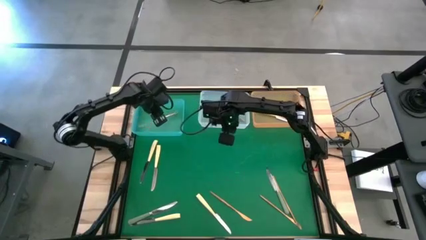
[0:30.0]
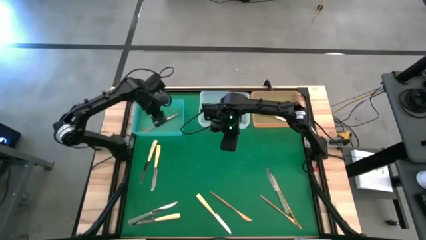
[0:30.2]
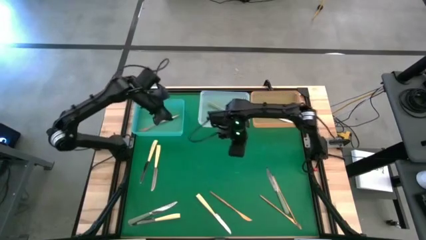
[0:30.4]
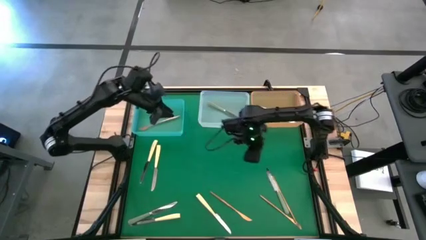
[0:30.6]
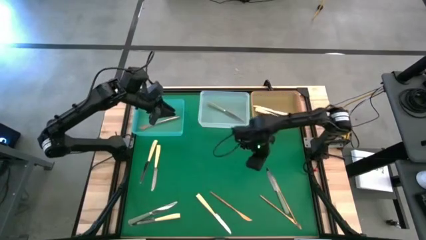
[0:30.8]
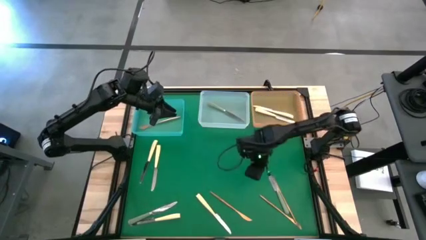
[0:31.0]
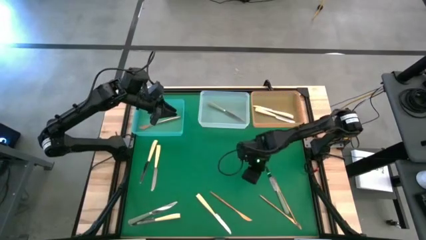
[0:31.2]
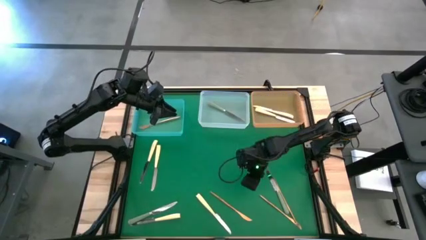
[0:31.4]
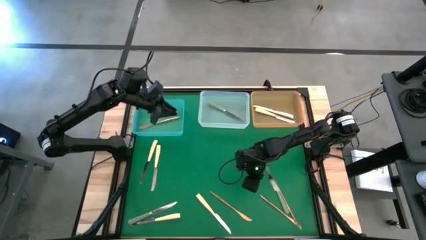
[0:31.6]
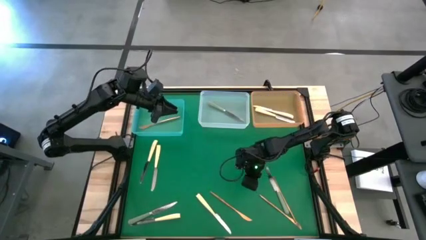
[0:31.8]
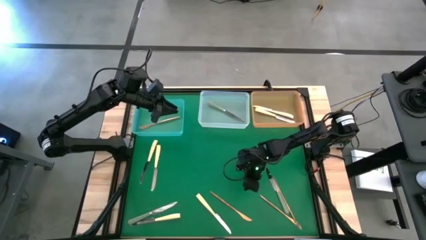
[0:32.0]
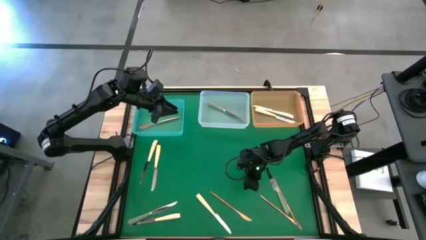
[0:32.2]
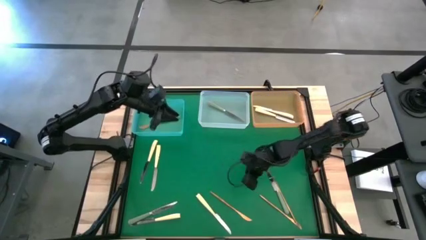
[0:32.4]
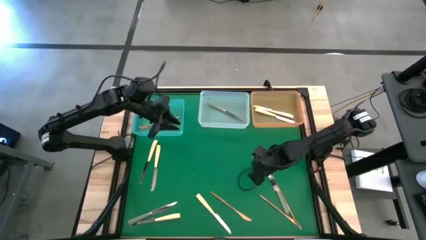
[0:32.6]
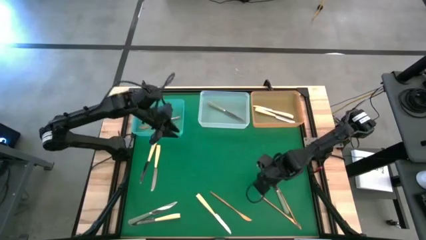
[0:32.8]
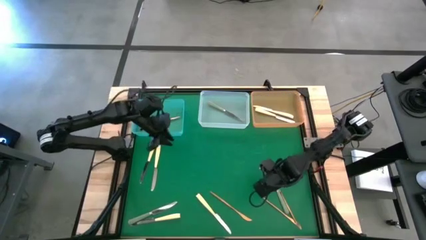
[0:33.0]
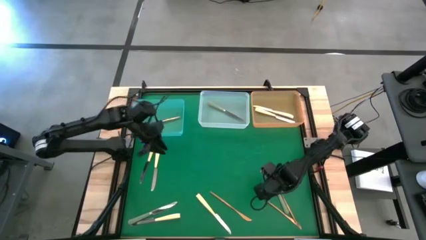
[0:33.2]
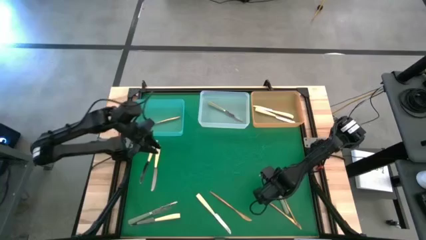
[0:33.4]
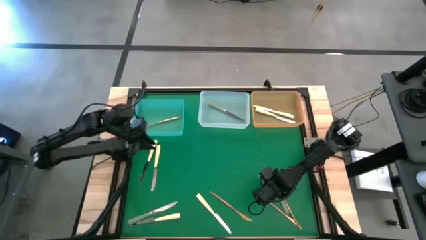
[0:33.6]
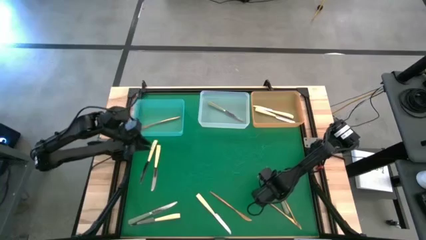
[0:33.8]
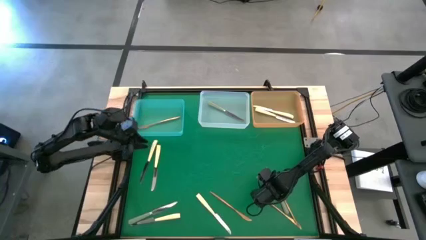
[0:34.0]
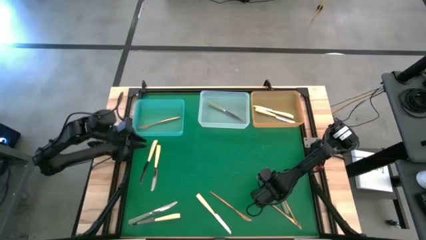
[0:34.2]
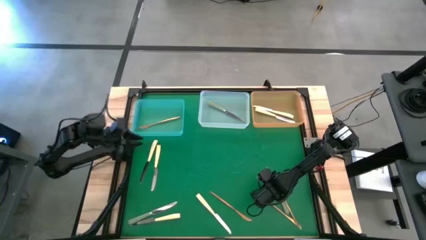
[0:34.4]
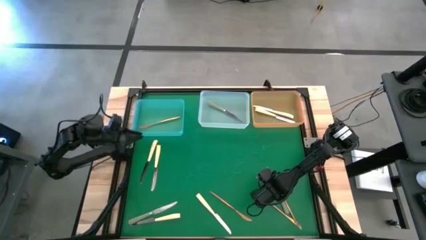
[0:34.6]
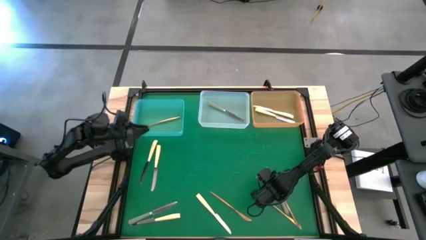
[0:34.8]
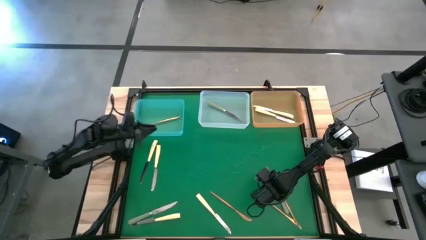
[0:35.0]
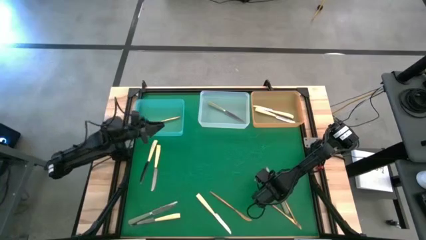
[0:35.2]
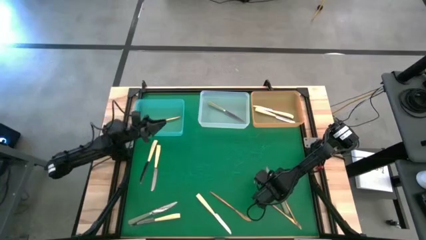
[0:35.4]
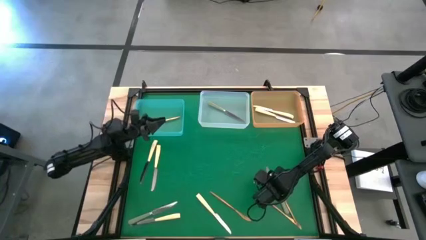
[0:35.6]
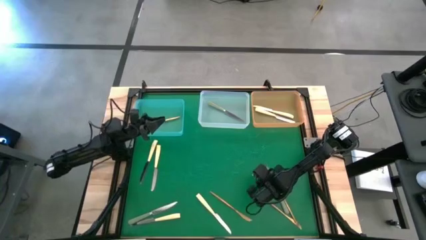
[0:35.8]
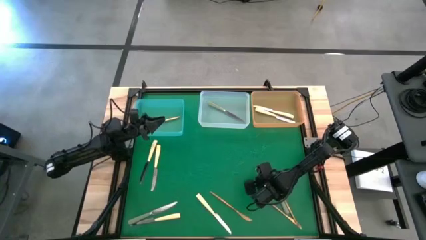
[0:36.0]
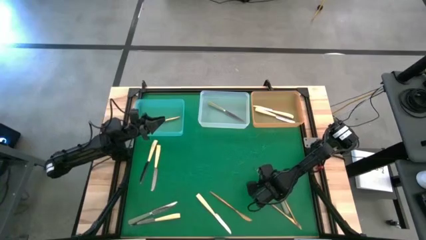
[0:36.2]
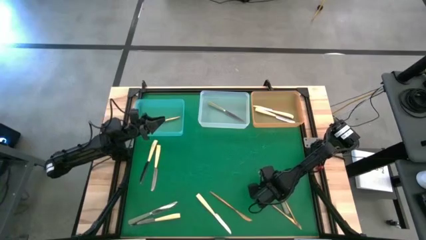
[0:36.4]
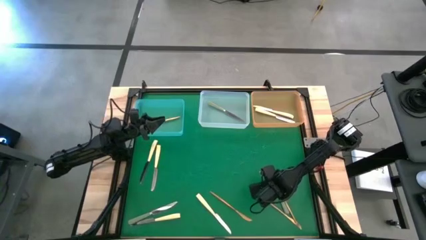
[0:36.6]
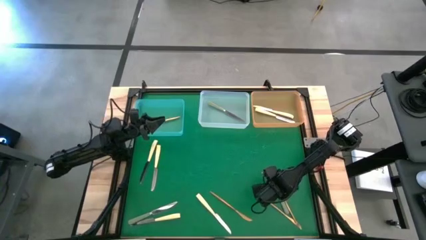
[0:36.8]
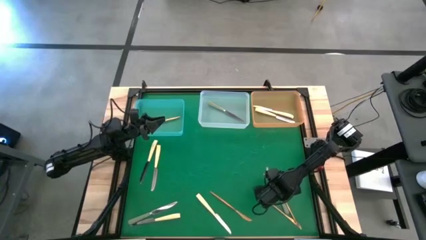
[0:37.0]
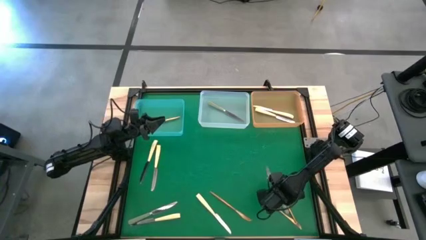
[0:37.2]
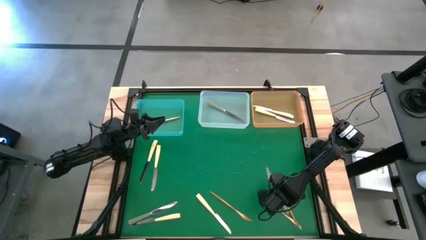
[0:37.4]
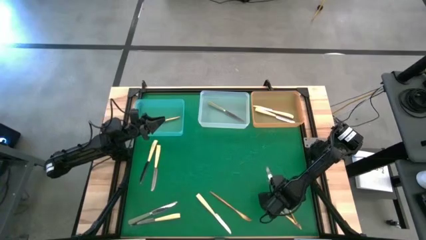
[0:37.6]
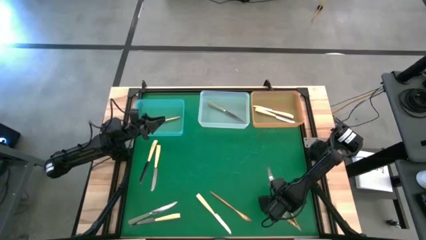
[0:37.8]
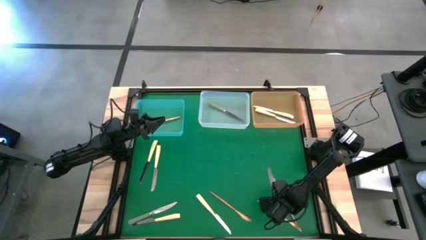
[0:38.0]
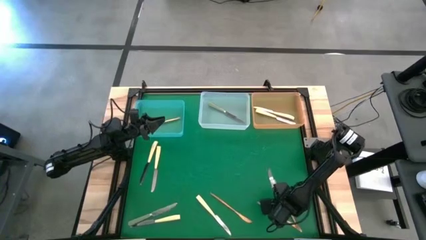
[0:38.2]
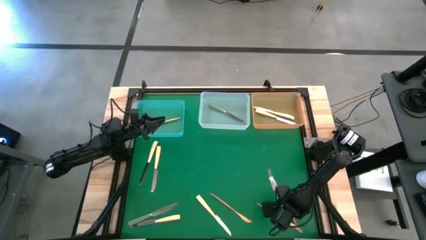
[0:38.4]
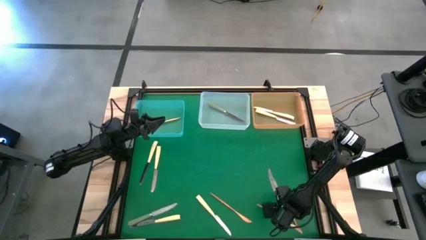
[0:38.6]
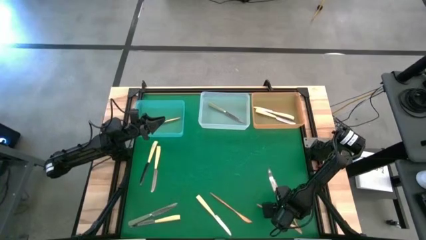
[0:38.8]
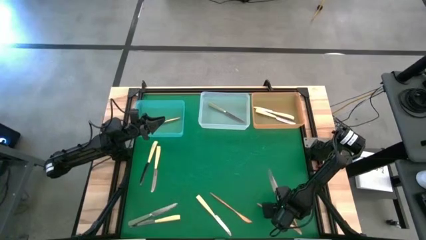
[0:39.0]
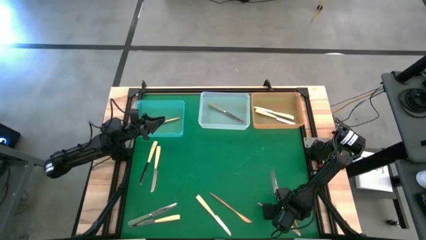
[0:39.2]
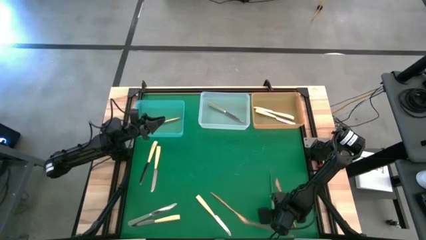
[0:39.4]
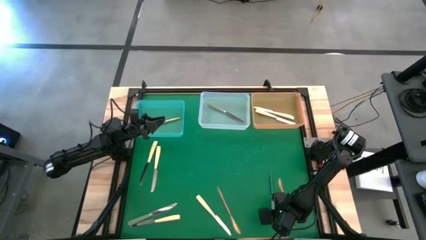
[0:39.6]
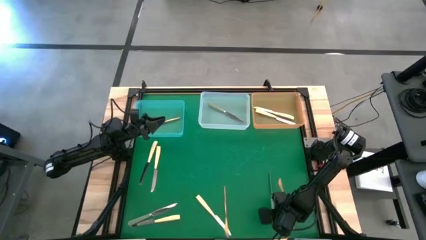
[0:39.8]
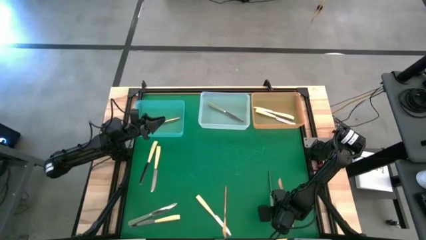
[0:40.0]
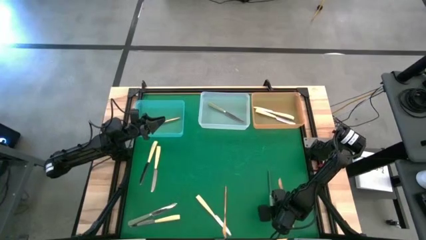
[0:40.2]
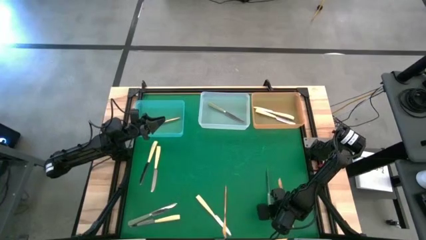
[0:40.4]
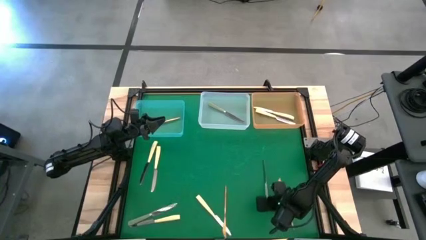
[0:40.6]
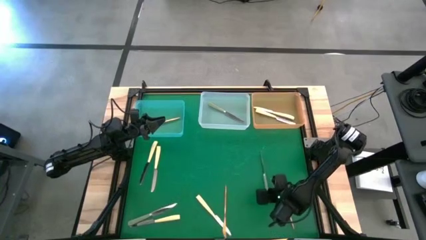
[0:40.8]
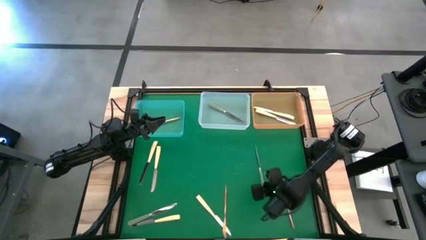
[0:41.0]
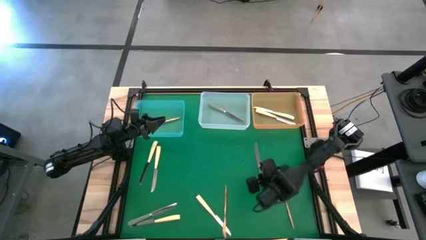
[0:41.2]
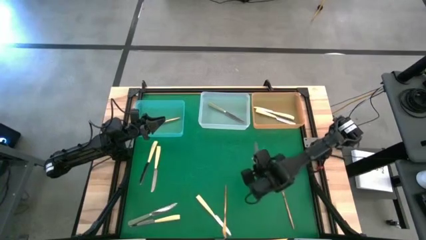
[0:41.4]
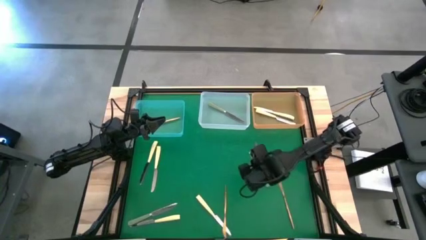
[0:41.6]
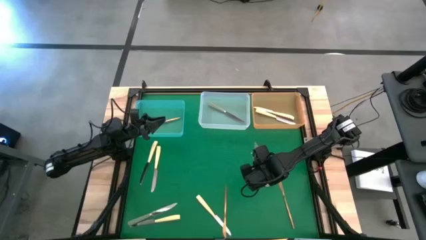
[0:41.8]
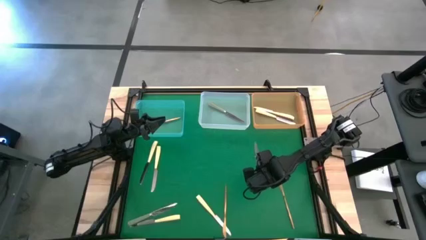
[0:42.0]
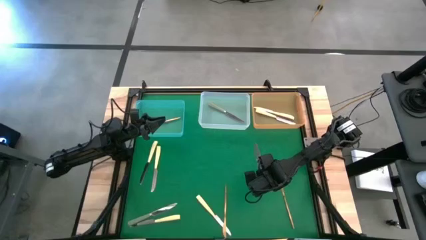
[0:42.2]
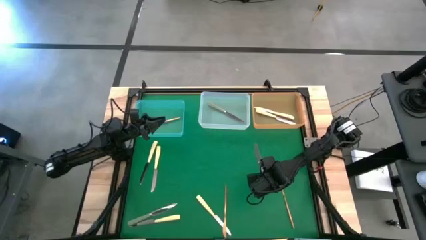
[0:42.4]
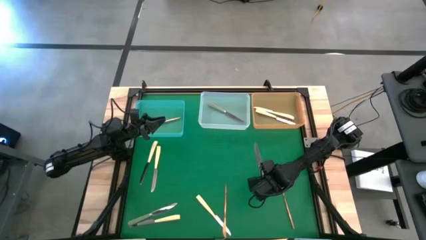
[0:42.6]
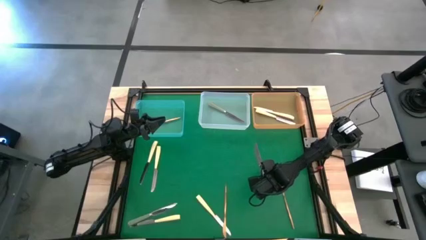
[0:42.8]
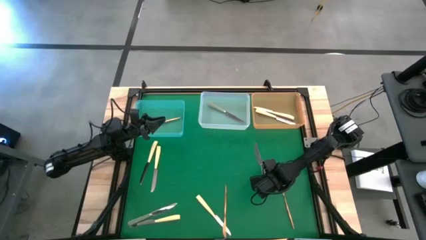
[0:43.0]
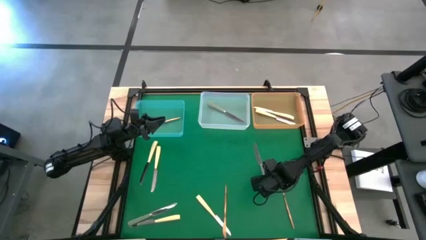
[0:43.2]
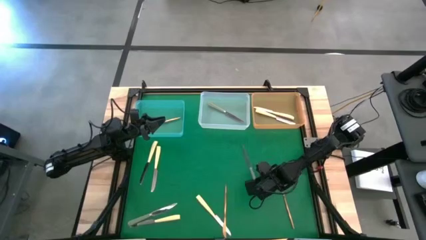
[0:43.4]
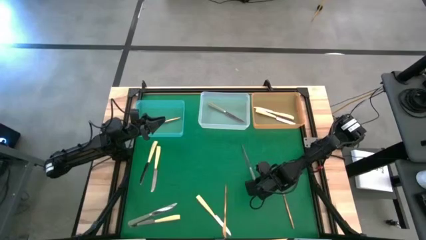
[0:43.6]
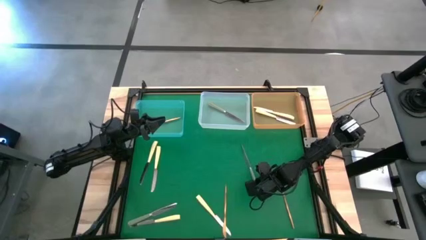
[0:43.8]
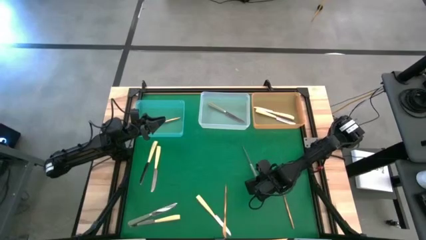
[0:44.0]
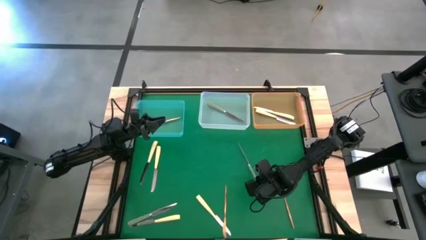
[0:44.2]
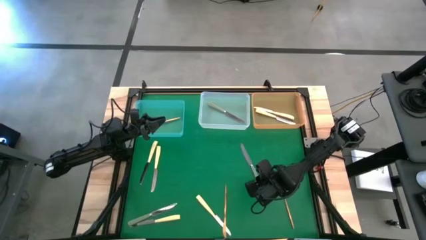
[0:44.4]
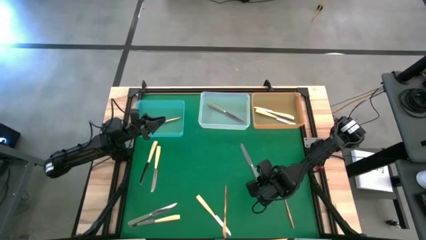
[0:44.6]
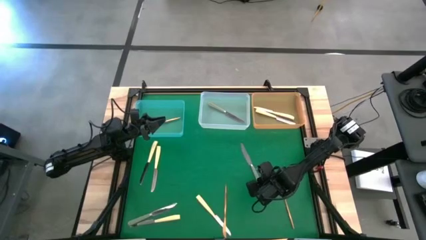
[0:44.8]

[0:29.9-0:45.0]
Task: Sort silverware by color (type)
Put the green knife into the transparent bin

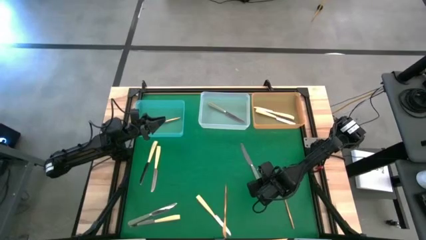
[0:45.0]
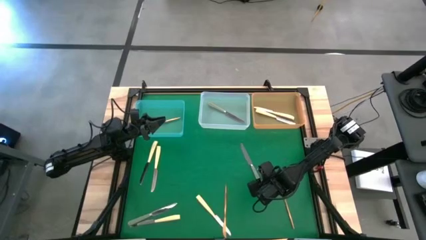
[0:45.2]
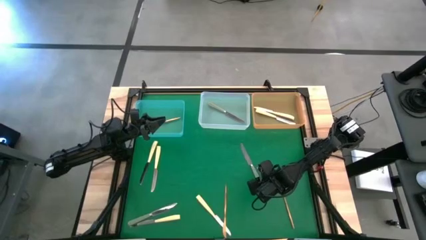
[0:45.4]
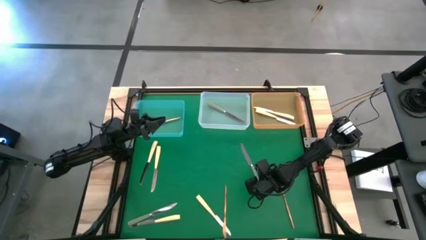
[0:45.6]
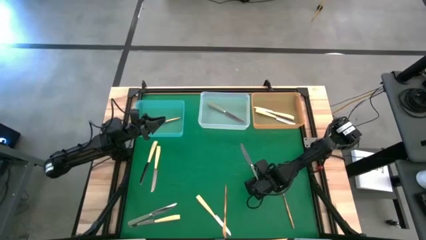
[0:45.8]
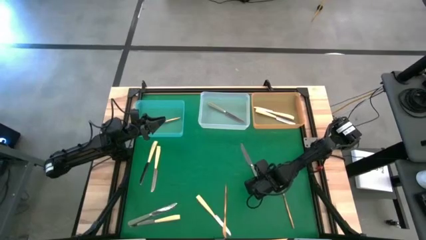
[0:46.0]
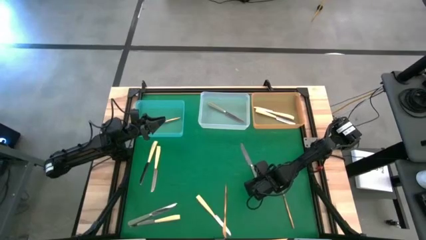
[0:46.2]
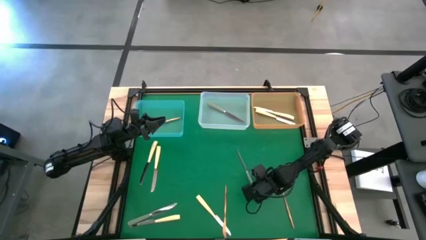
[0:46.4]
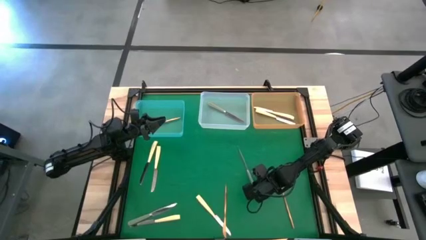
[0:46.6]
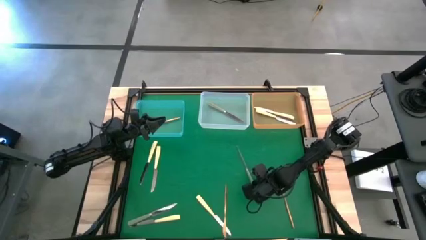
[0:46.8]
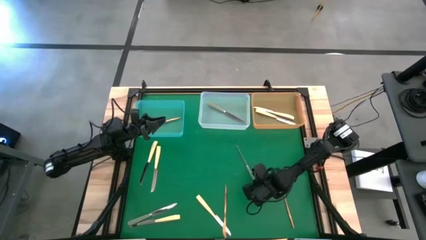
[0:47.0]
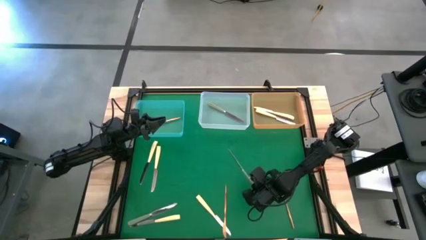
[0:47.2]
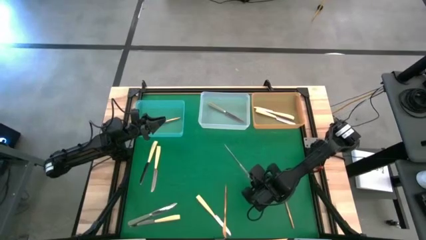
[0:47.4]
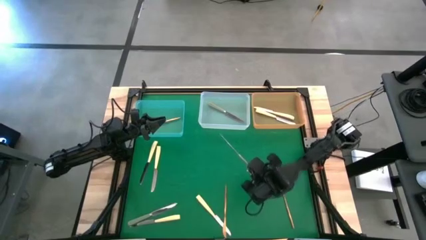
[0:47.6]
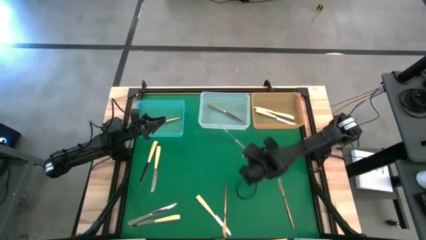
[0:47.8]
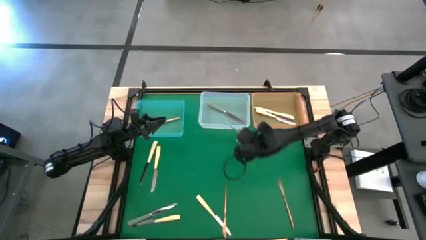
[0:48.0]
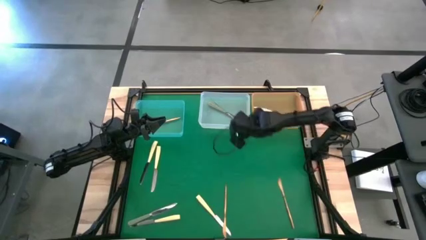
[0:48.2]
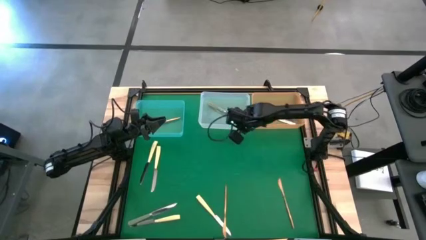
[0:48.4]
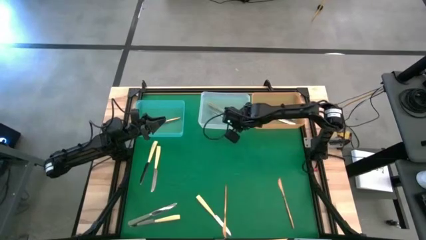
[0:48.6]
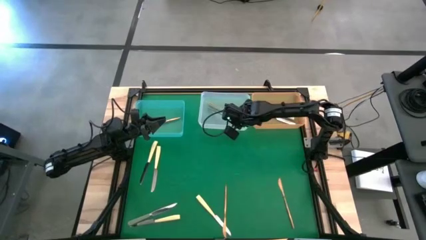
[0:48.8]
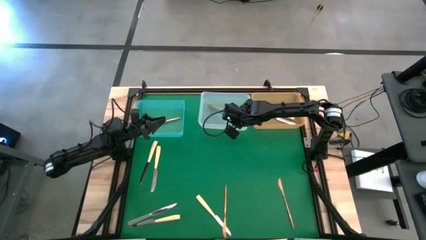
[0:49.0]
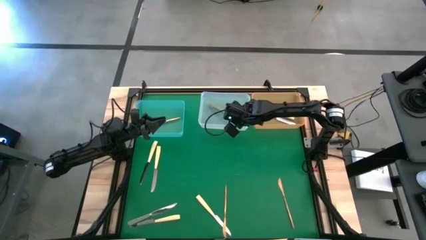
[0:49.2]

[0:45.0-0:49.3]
Put the green knife into the transparent bin
